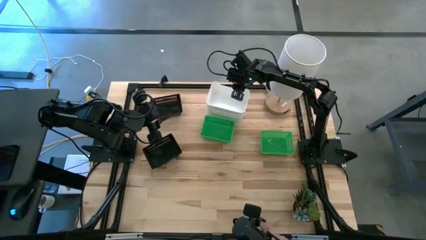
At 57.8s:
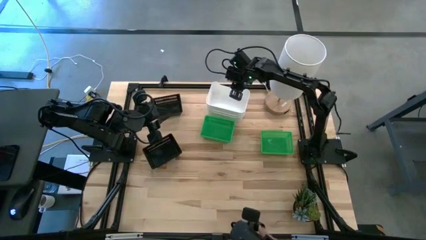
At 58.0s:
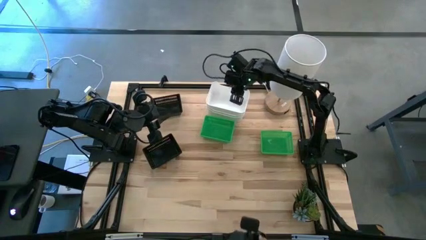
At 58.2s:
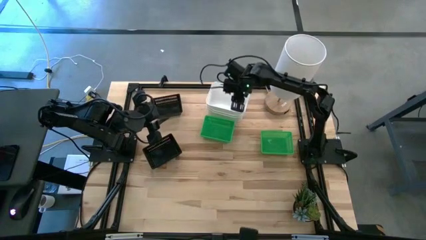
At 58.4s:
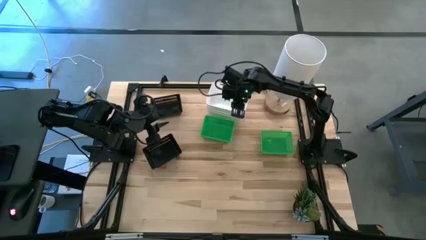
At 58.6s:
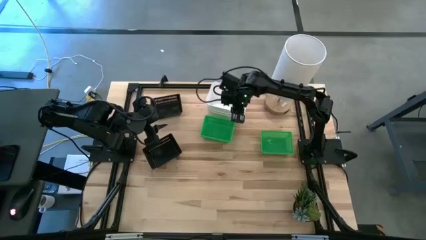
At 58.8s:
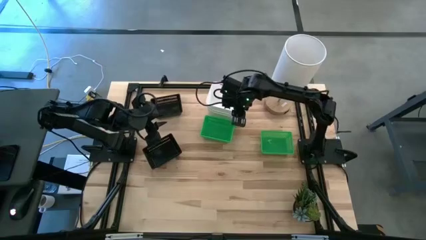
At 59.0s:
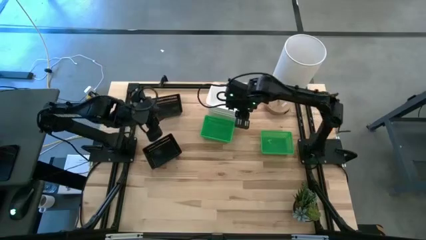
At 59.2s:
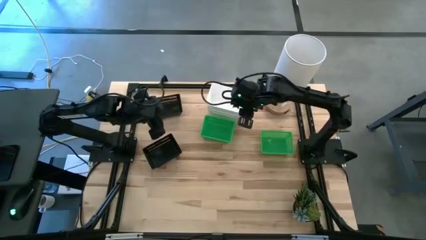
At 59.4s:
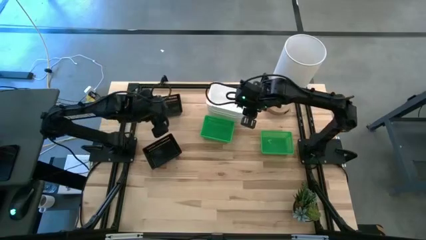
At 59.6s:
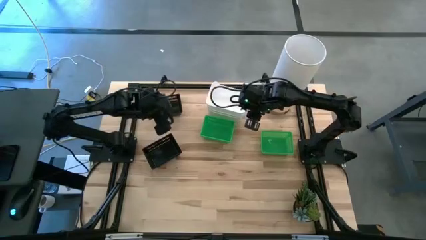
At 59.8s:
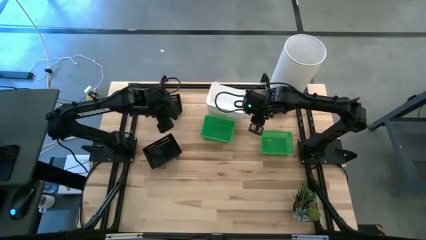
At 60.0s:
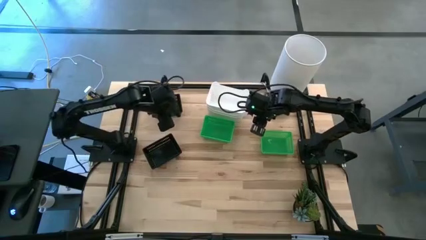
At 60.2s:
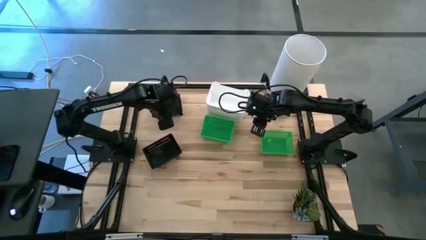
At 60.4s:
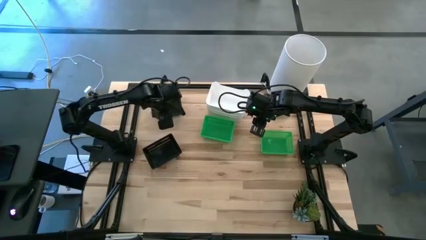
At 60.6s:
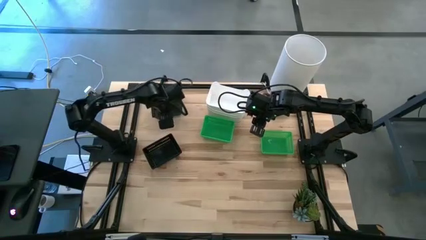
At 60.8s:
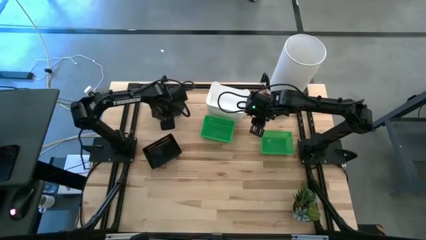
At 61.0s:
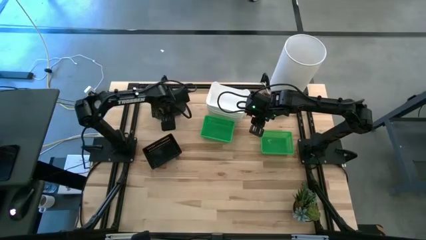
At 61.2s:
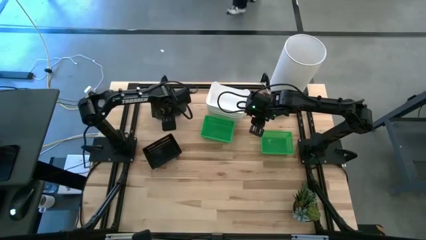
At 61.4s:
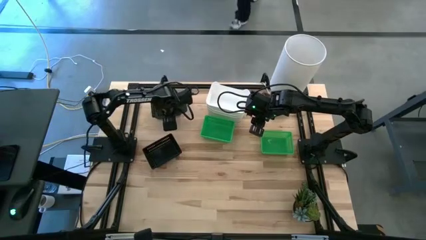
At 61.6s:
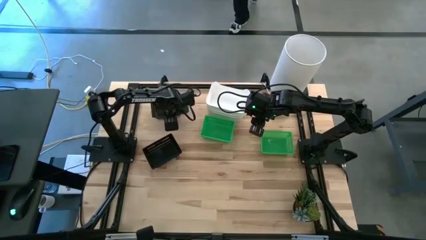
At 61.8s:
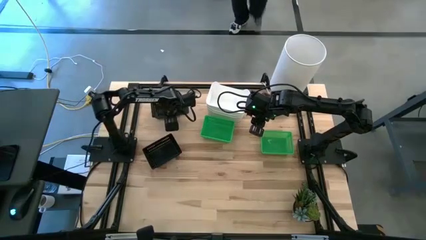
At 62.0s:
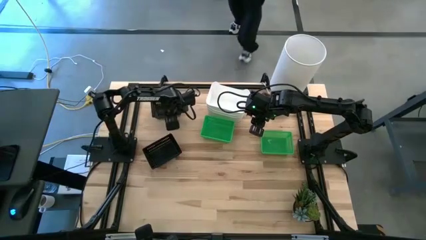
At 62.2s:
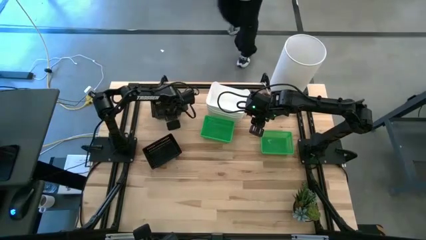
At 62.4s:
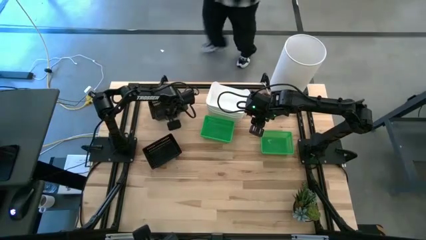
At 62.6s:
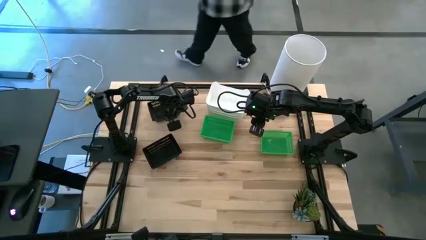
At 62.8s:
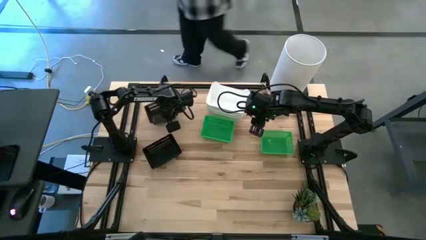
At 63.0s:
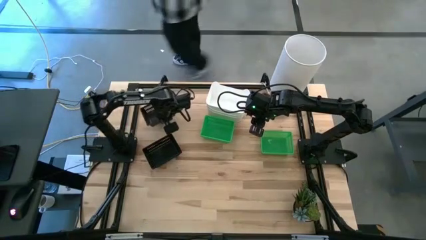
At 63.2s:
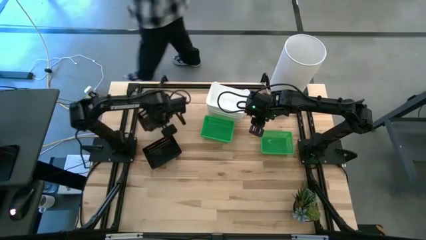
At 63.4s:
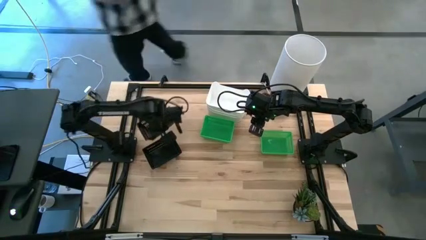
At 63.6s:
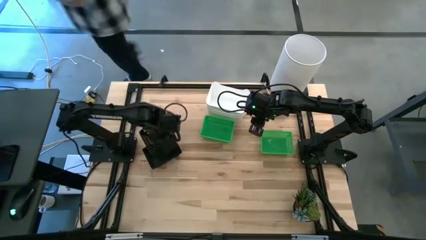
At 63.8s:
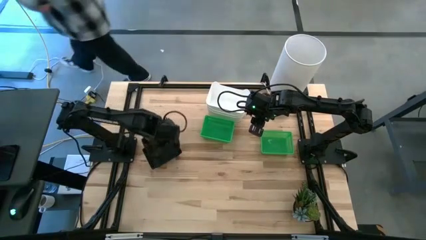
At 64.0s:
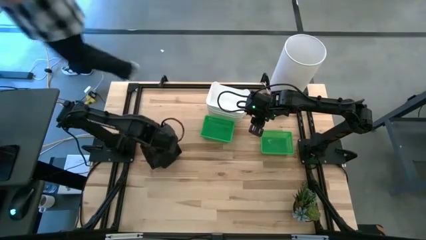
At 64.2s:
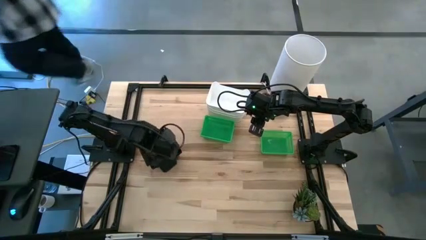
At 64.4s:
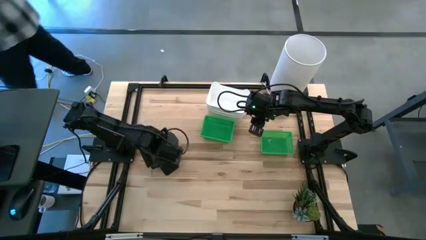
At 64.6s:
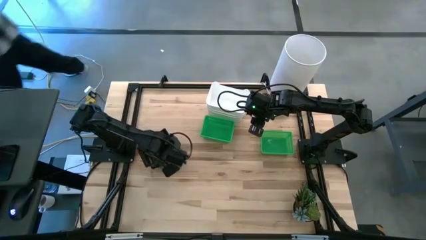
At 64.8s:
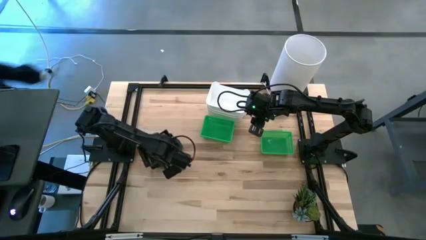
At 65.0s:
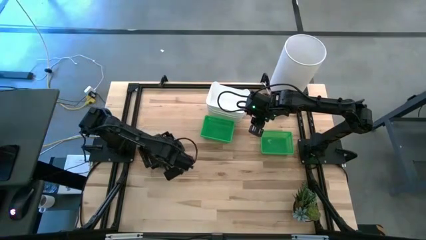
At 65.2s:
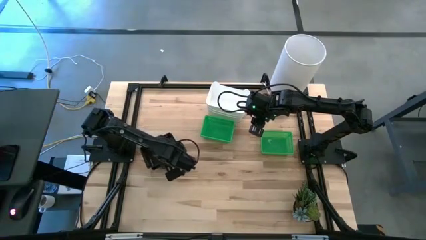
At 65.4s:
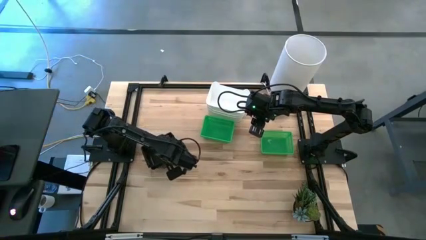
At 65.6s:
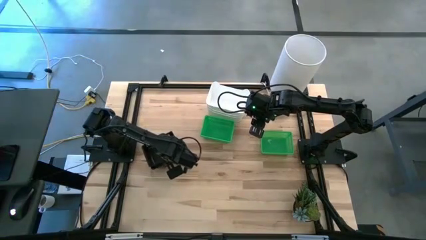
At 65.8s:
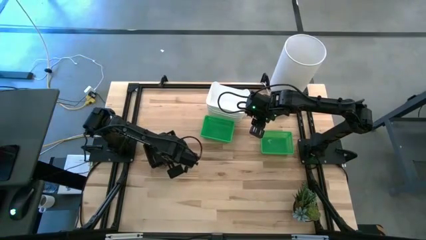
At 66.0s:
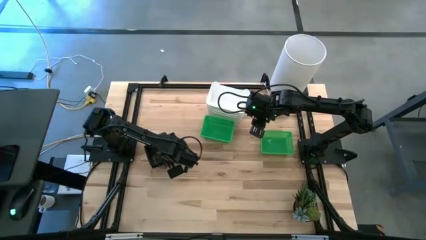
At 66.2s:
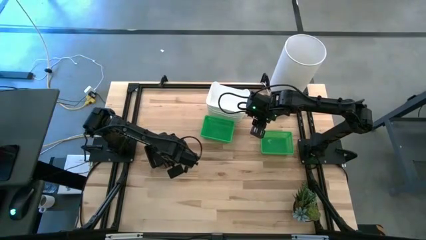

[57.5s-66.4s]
Stack the top black bin on the black bins

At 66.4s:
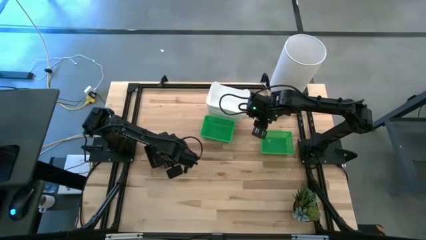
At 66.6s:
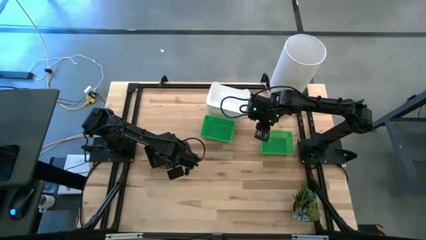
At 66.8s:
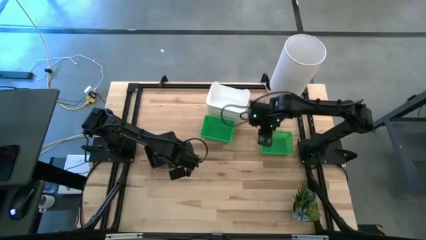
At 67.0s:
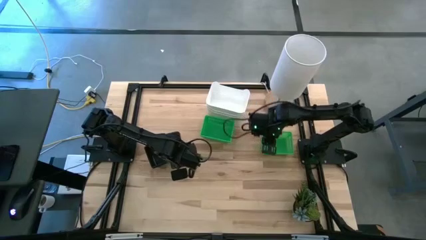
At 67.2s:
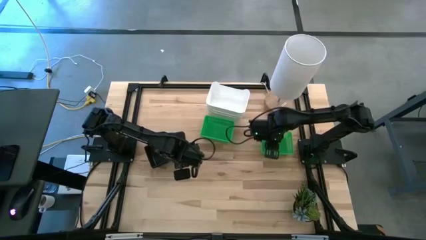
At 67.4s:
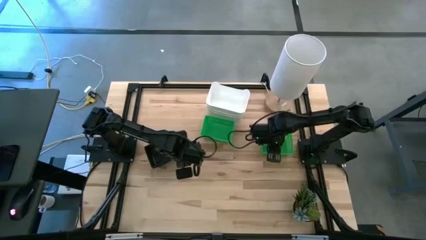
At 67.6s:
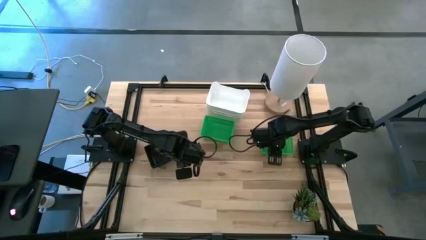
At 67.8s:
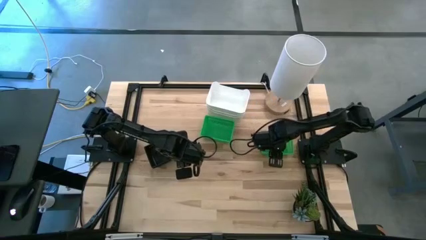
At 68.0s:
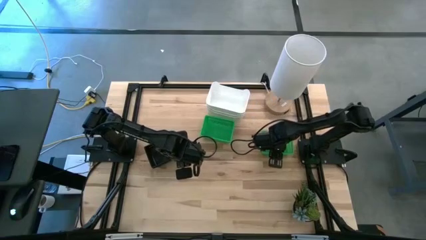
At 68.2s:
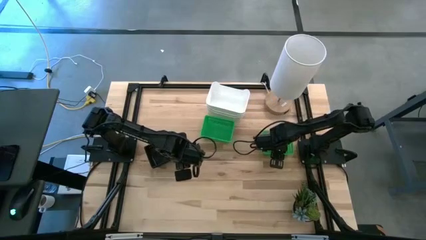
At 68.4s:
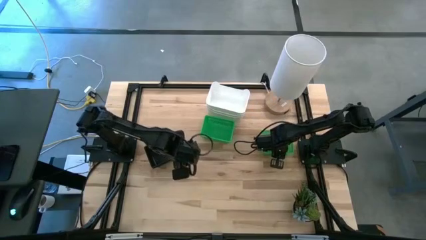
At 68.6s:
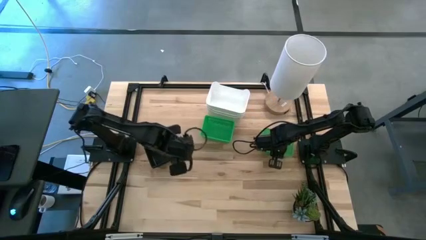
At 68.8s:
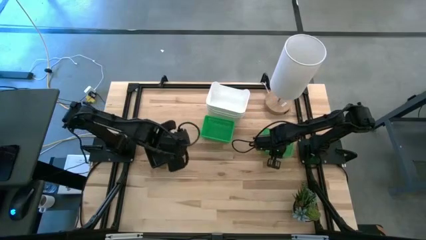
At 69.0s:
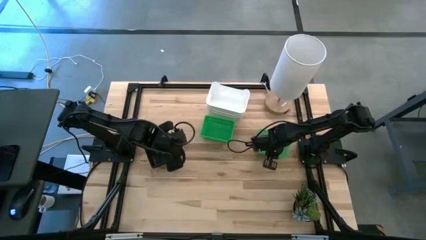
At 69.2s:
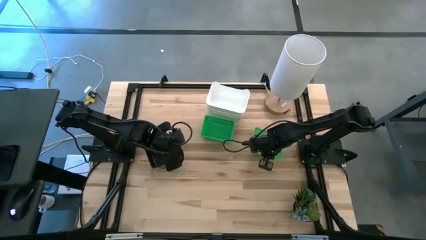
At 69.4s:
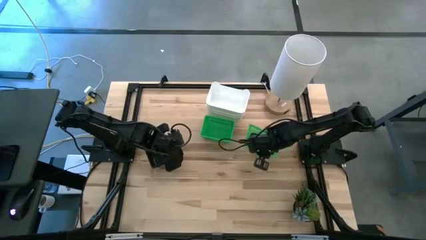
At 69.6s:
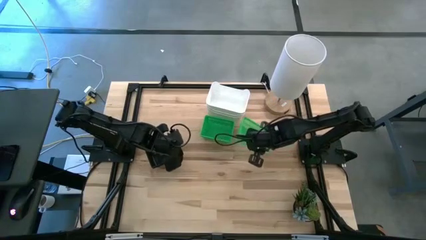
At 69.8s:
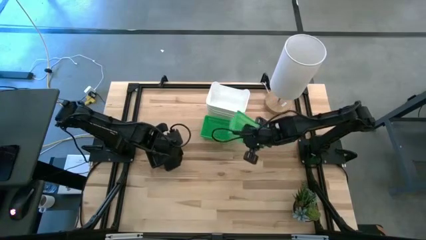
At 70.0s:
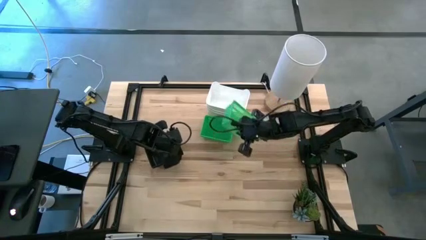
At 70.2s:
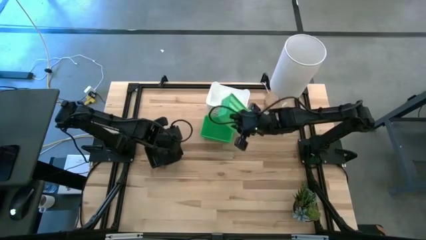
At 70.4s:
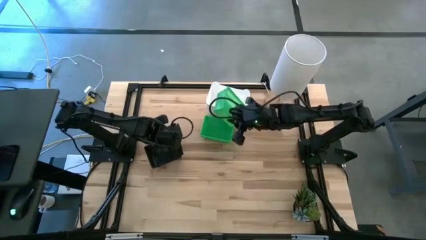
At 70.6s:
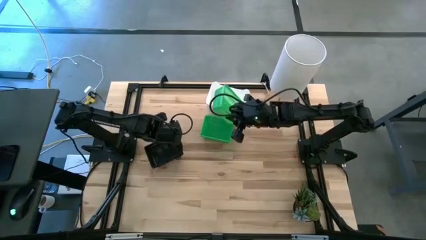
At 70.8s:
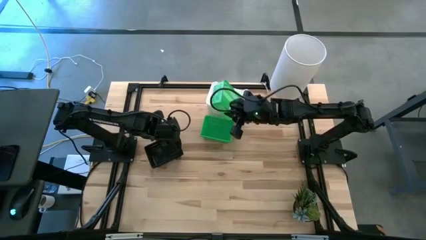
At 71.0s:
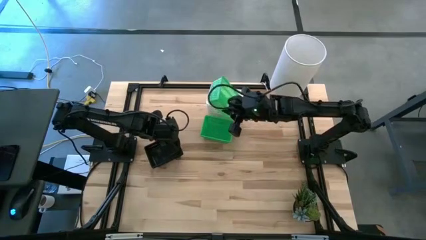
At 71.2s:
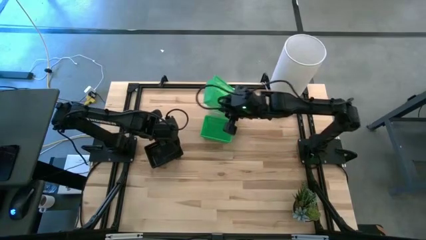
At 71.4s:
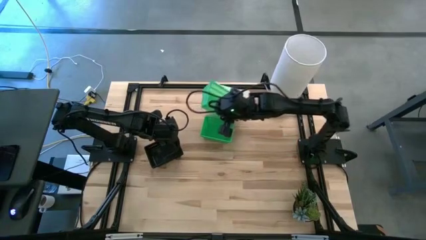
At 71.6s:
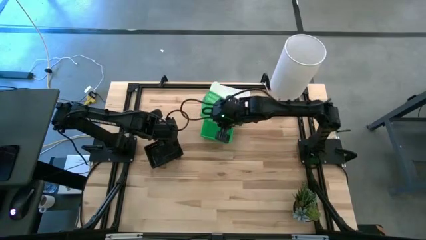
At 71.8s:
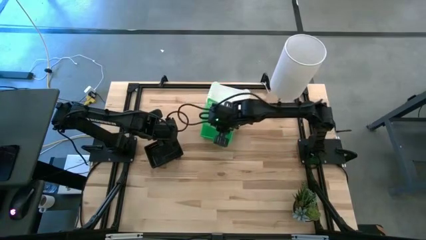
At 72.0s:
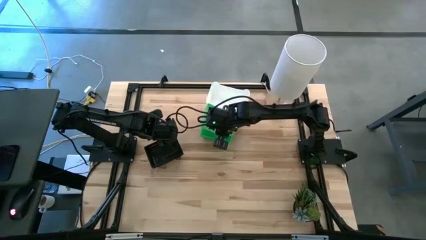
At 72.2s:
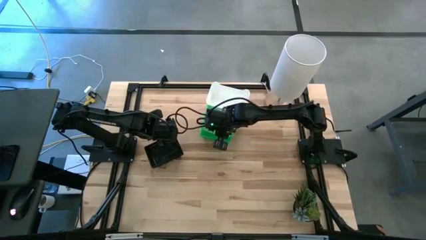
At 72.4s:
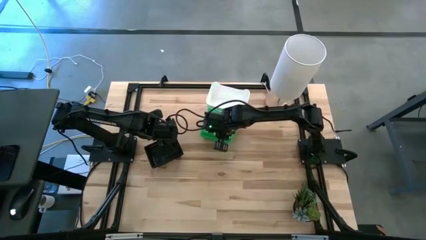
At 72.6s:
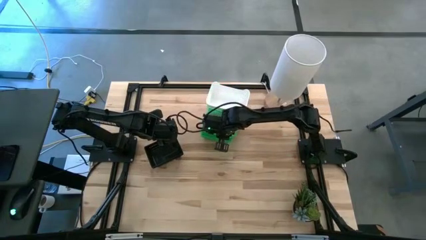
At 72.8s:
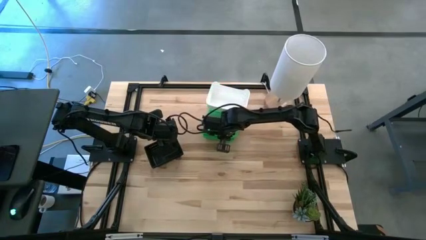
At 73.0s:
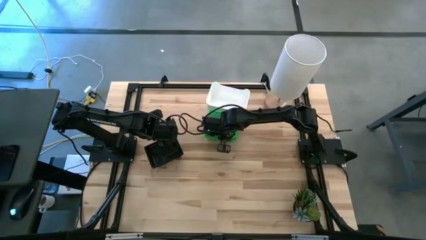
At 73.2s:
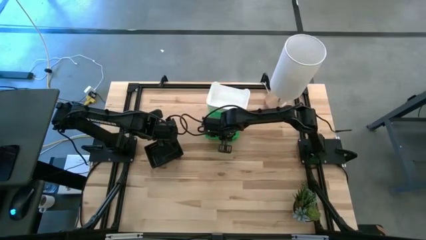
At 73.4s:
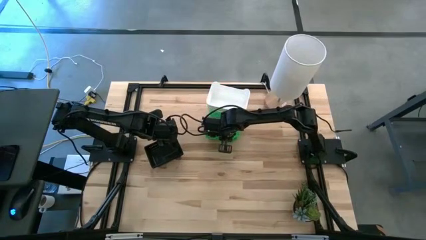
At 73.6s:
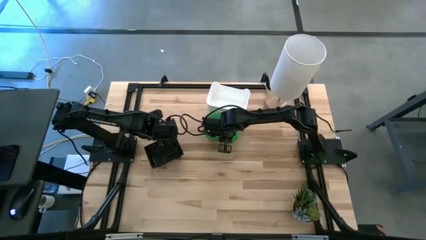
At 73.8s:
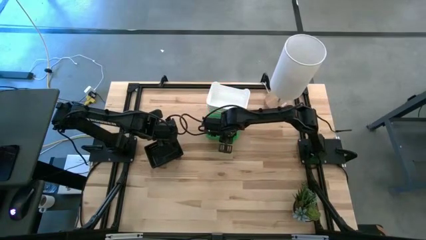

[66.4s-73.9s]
Stack the right green bin on the green bins

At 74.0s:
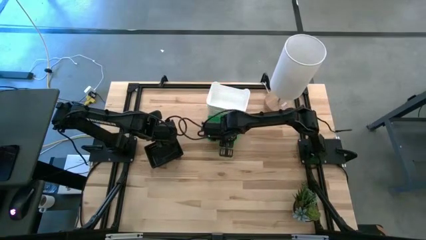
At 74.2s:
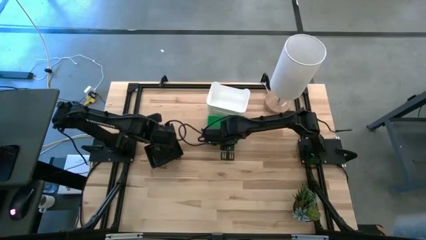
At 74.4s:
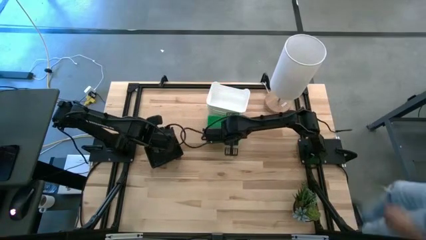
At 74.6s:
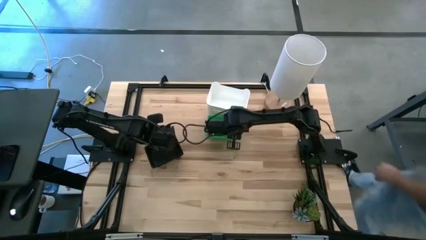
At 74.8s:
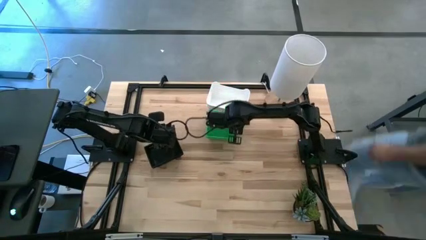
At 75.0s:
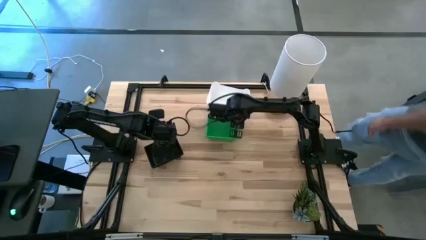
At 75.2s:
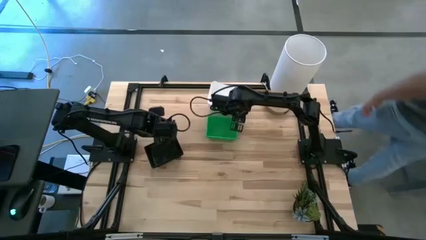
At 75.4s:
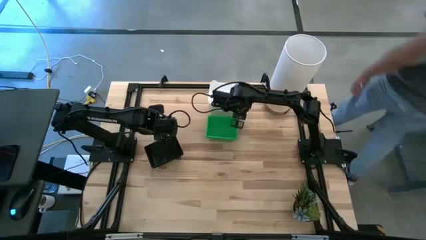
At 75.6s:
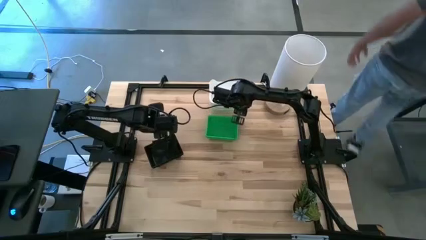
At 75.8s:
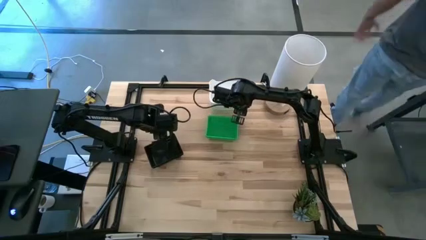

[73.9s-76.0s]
Adjust the white bins
